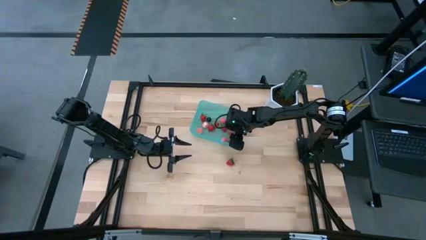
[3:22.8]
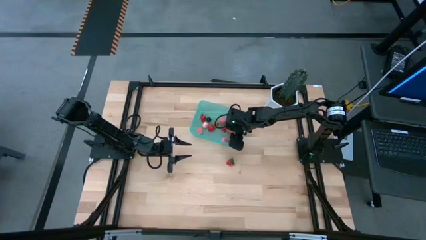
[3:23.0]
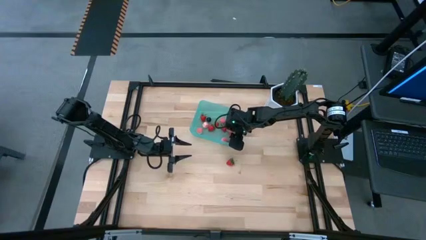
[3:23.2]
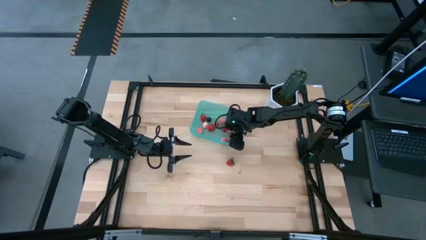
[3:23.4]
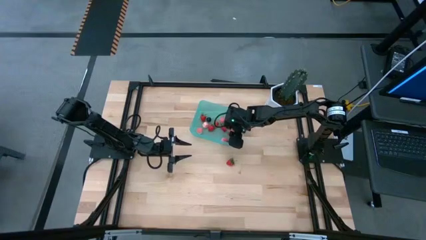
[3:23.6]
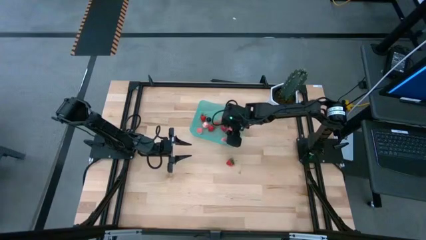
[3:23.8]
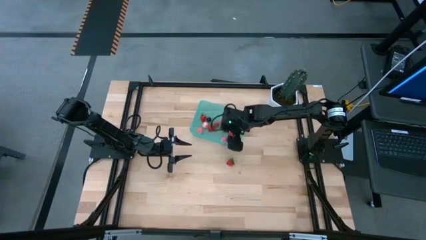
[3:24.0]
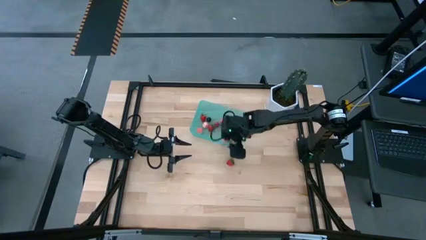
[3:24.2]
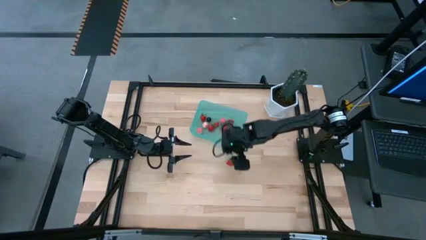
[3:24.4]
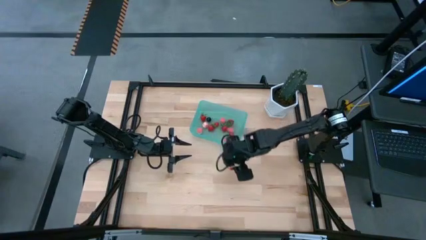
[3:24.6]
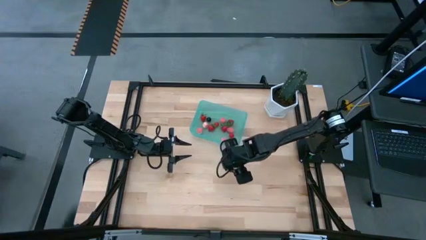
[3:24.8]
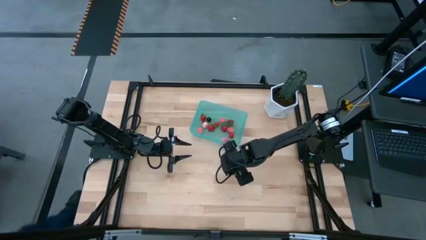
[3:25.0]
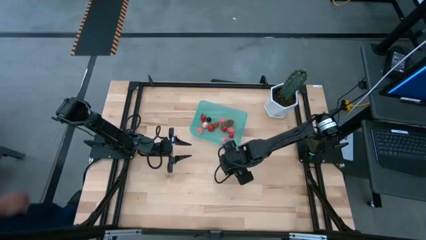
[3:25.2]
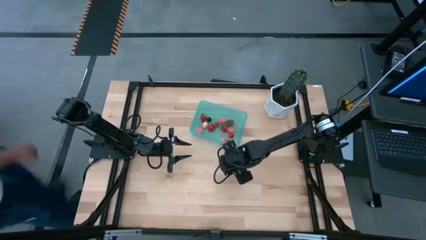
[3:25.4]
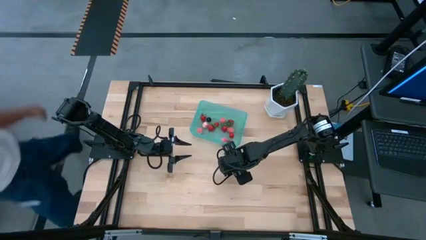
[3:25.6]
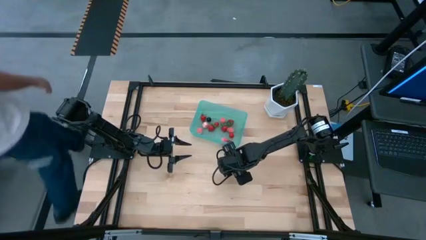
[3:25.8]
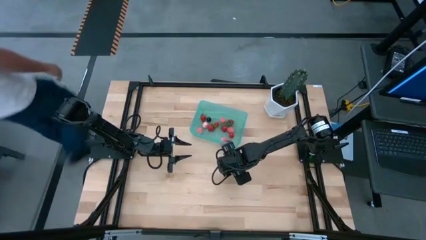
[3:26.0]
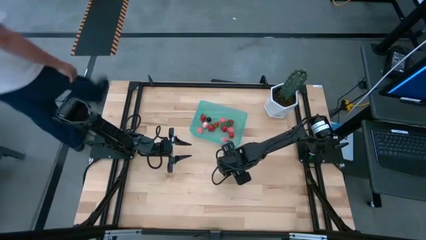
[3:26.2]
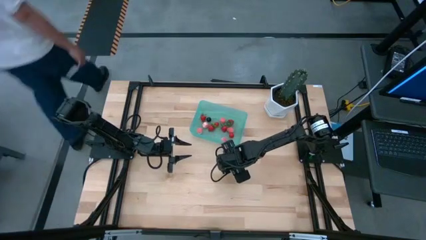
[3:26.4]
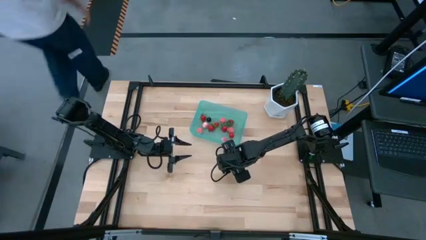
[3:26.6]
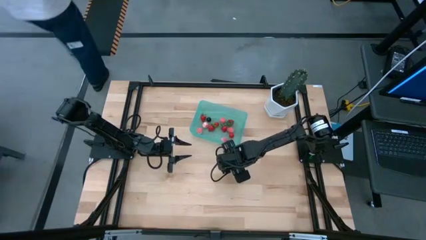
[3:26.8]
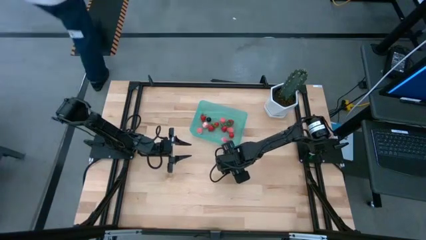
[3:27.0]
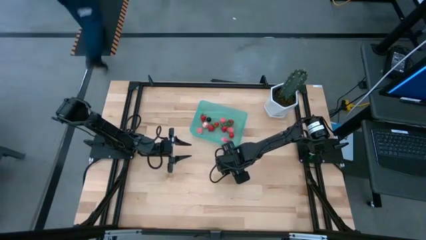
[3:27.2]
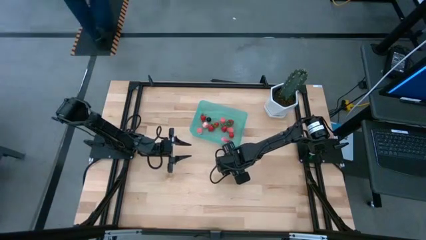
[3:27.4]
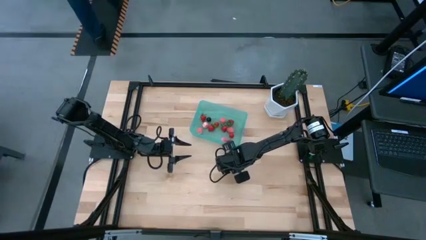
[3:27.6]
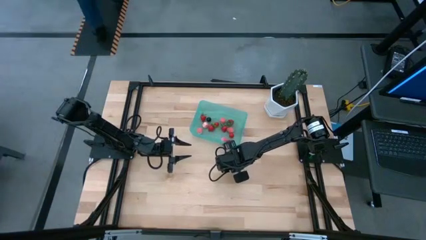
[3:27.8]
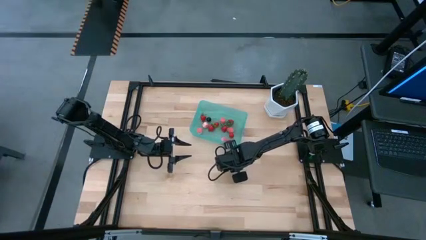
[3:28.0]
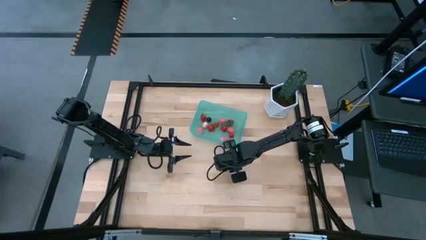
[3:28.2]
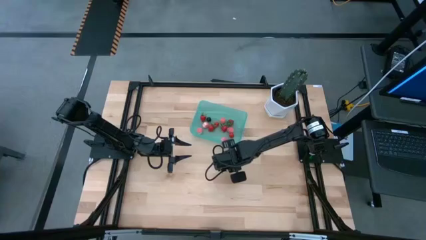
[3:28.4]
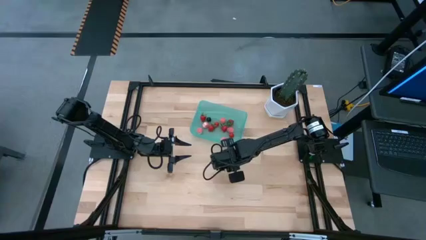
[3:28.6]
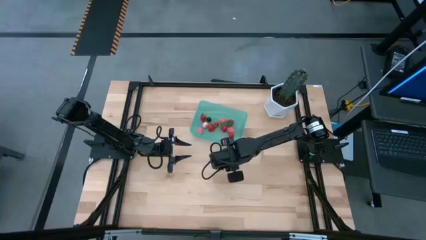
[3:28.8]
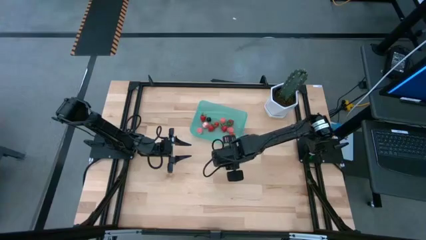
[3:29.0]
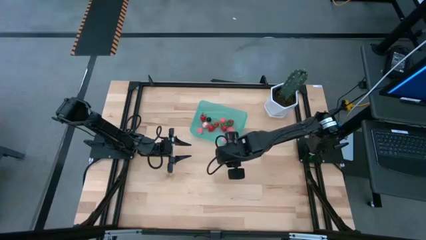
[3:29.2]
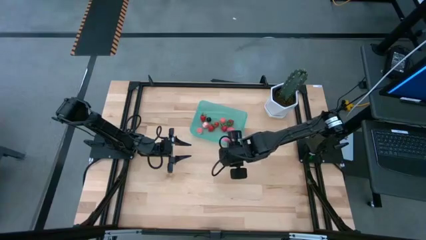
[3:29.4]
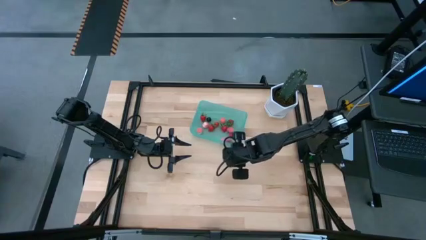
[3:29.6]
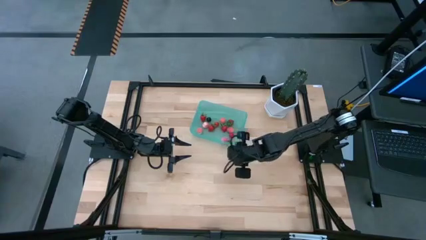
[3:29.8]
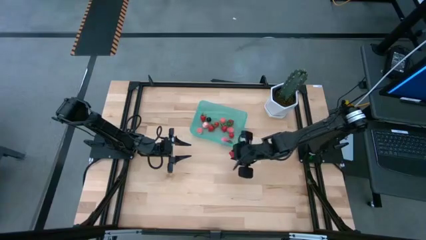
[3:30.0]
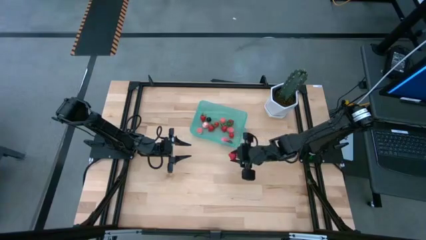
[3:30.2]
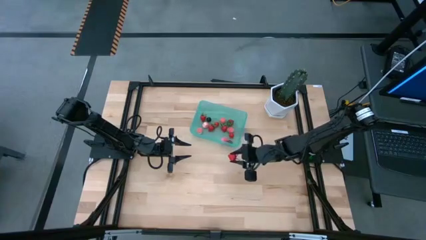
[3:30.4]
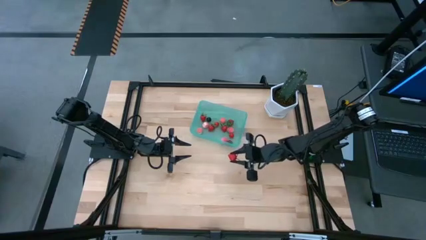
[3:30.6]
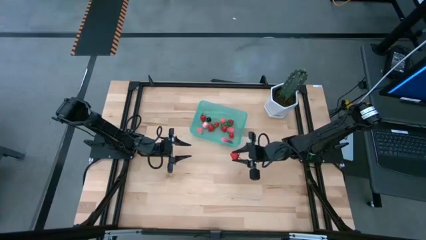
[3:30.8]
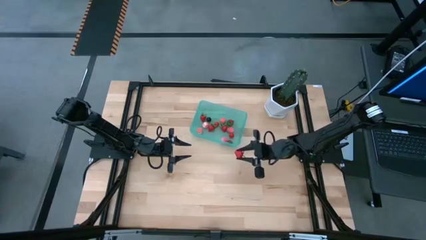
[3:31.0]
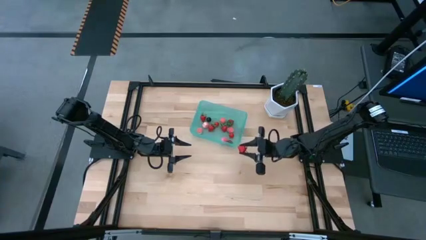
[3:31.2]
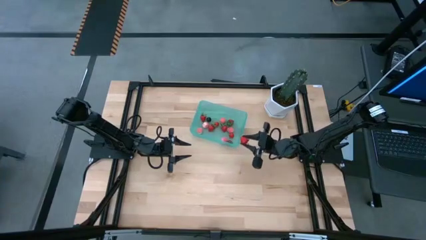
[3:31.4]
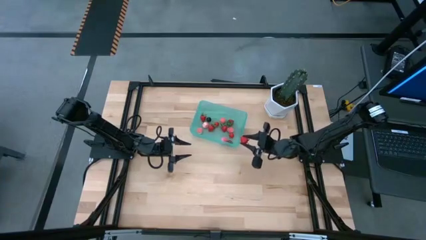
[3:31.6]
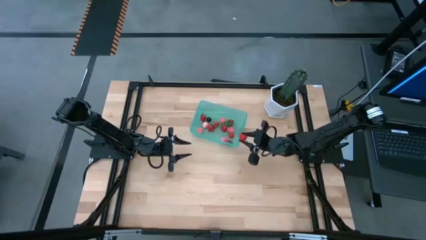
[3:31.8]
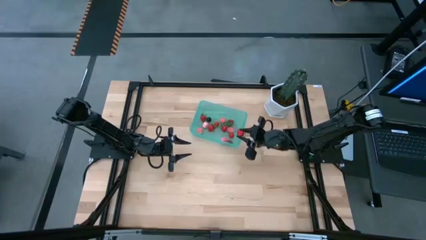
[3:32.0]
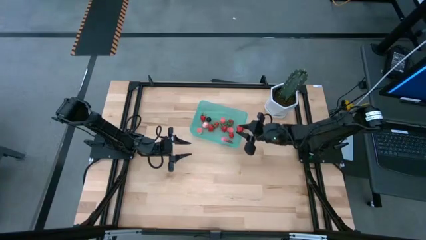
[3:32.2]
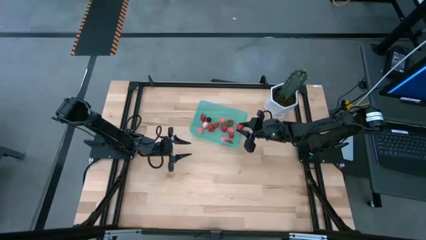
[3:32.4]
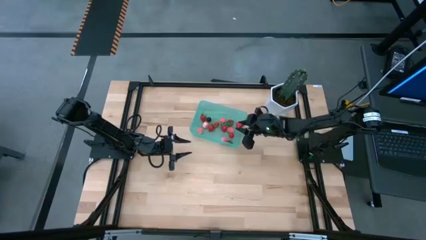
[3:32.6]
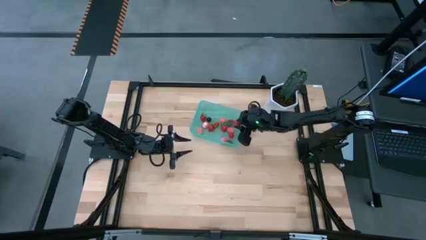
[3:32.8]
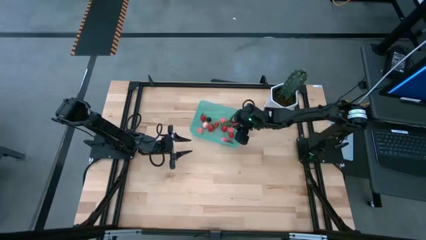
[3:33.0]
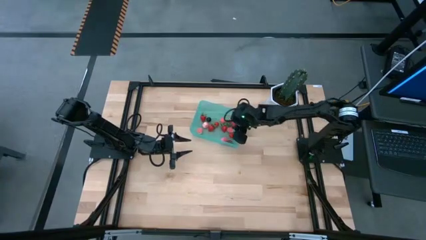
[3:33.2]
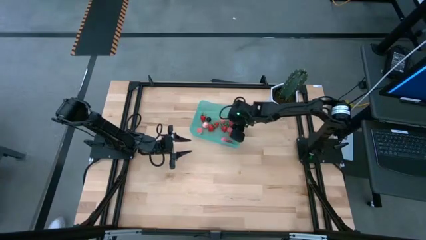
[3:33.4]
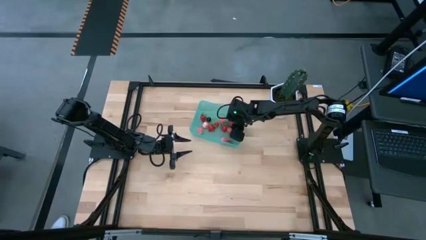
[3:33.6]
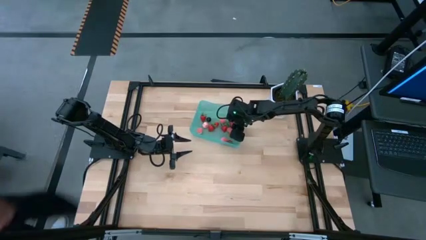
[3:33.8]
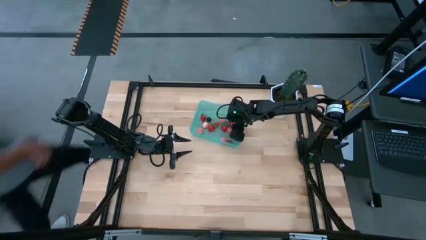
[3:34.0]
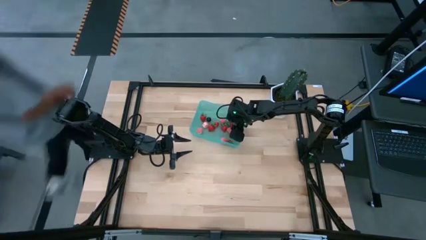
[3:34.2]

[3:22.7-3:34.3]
Task: Pick and placing Produce into tupperware
Put the red strawberry into the light blue bin

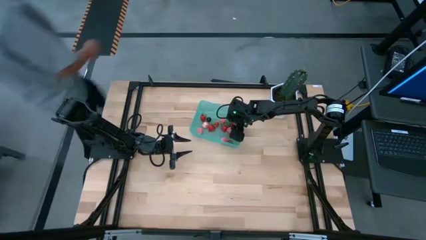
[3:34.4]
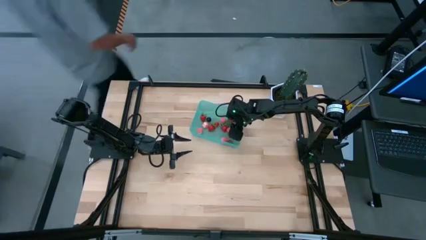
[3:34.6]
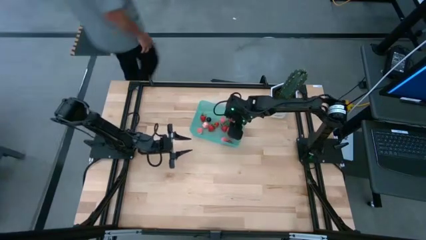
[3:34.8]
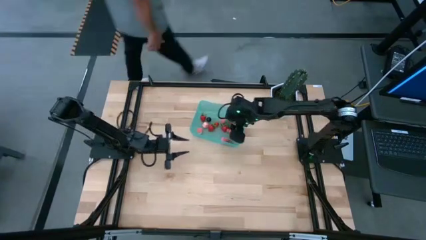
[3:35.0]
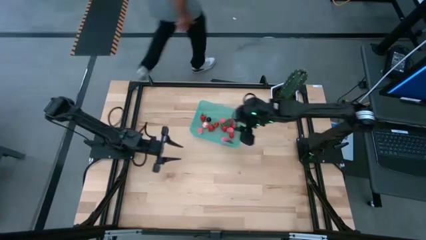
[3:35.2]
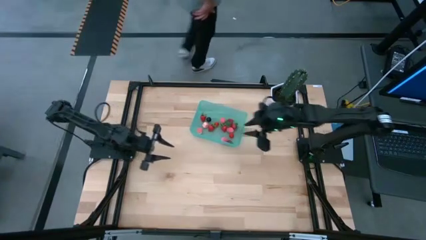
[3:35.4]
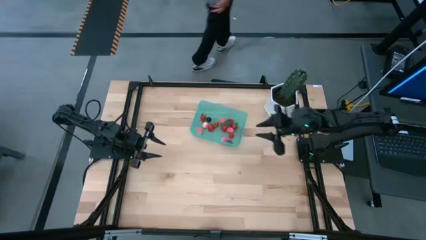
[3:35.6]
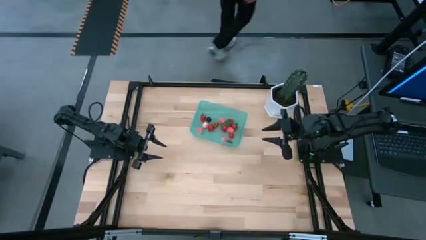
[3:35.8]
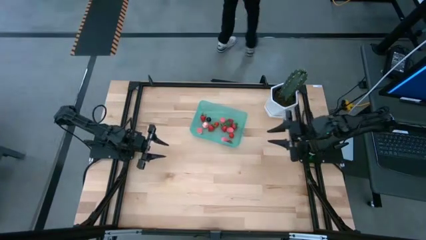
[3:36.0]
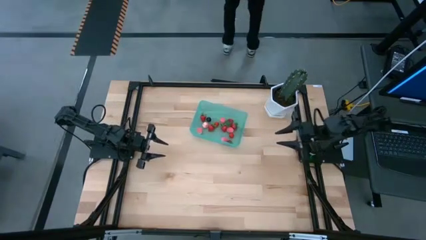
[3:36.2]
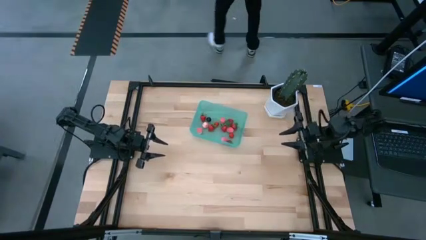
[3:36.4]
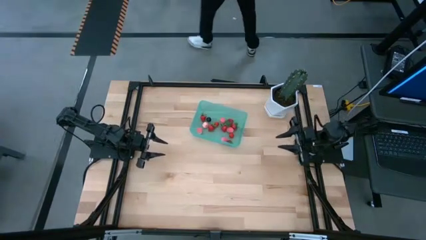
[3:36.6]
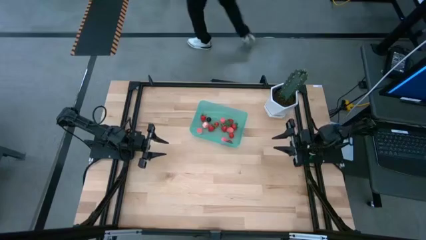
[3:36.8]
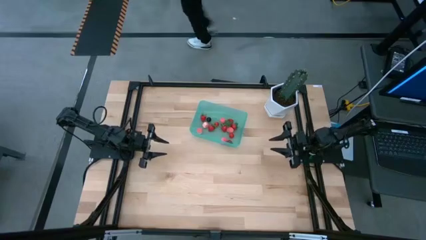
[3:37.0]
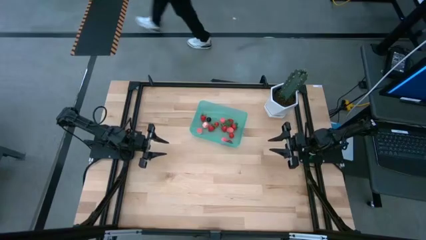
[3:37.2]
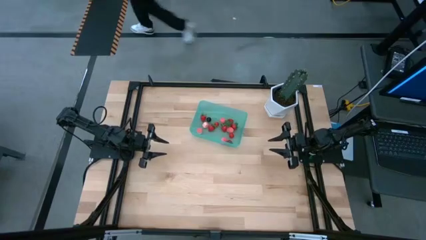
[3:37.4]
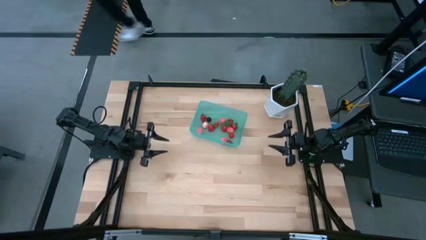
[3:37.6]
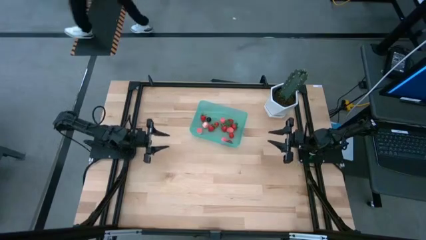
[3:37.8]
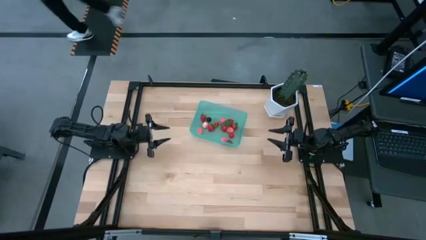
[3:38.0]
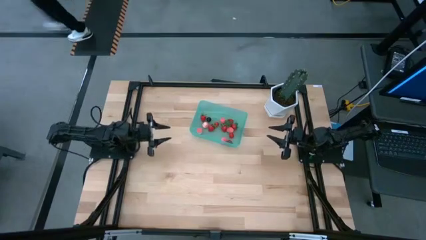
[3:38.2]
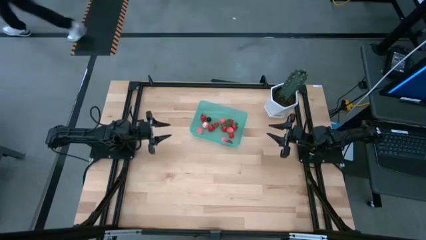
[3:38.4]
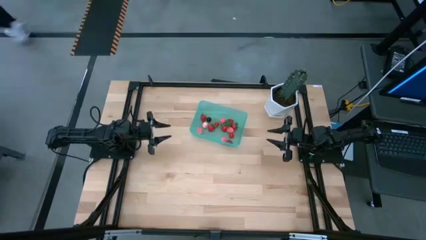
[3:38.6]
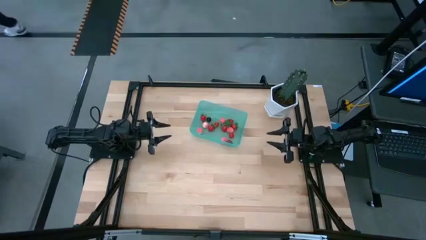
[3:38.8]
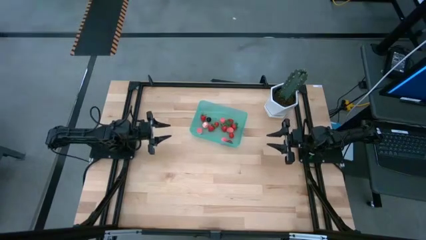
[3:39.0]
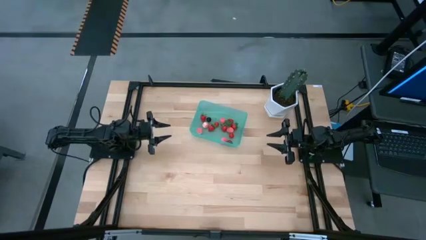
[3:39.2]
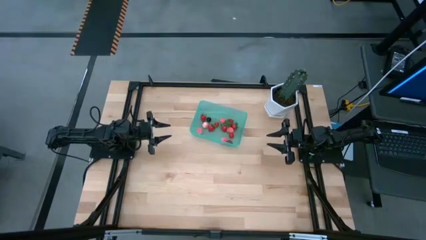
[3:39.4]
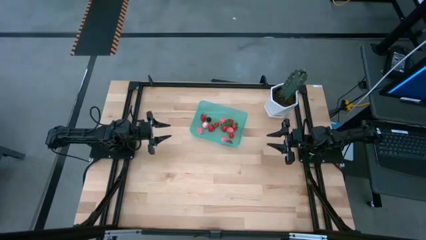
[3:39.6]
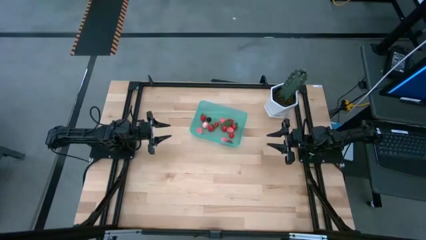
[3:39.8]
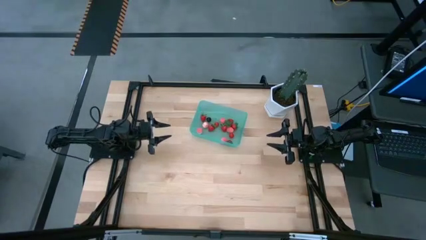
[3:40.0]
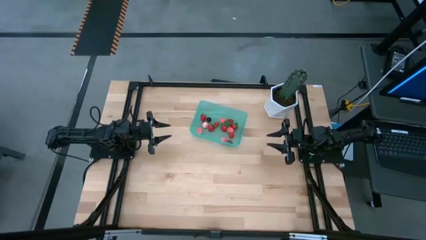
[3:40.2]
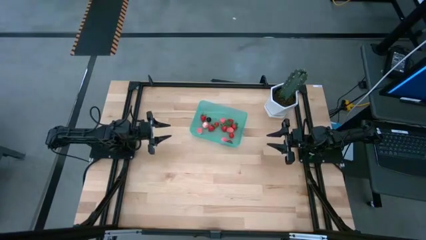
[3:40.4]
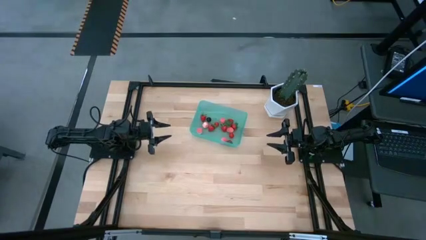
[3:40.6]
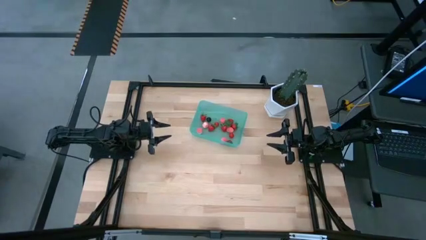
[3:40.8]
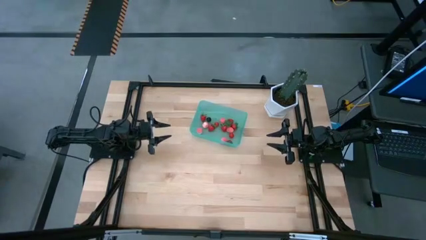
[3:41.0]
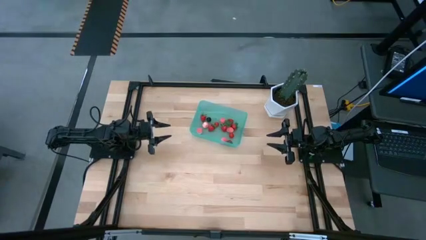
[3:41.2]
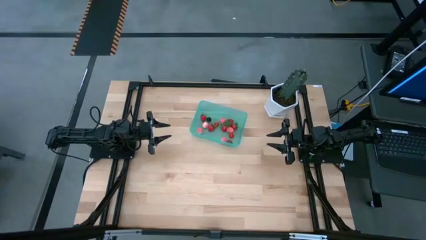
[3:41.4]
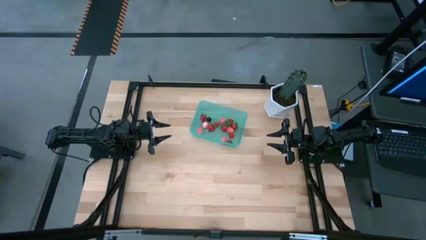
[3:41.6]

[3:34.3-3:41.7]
Return to Home Position
